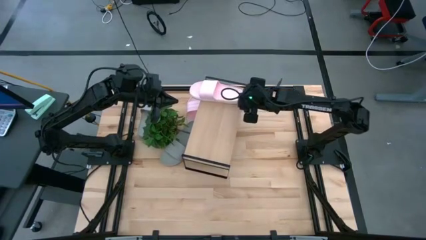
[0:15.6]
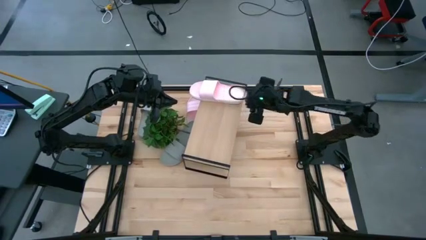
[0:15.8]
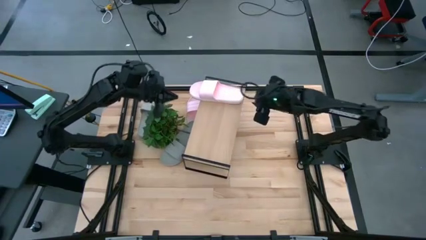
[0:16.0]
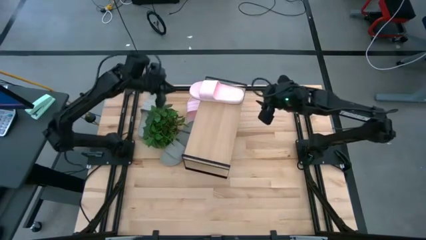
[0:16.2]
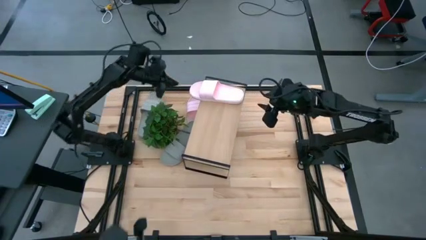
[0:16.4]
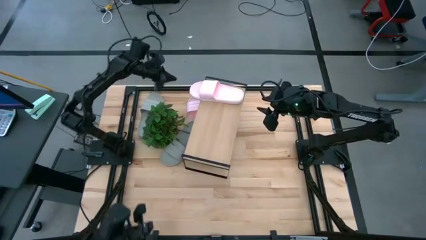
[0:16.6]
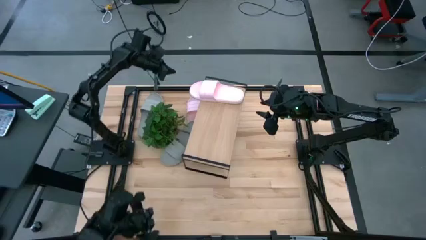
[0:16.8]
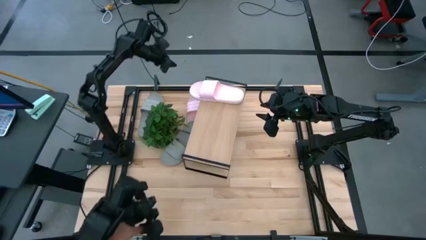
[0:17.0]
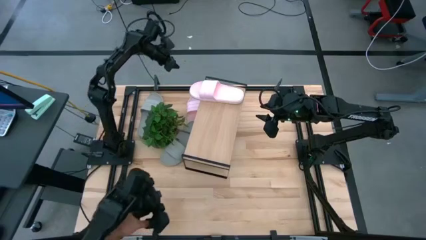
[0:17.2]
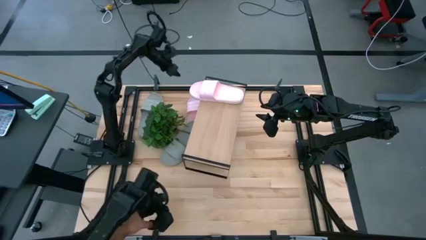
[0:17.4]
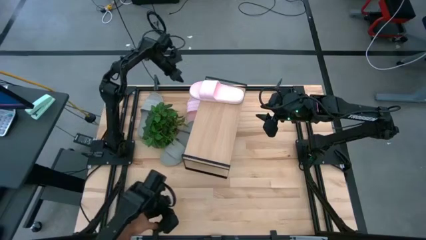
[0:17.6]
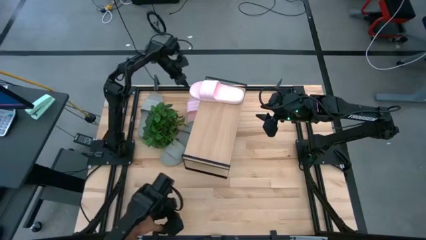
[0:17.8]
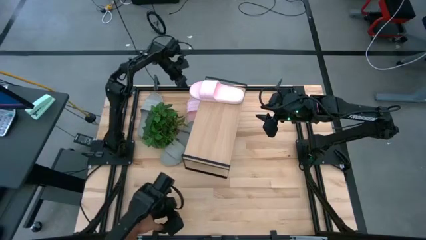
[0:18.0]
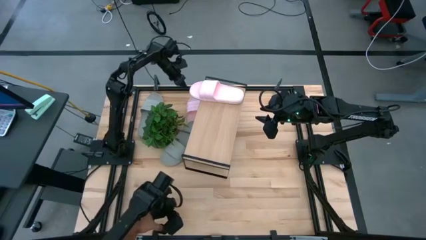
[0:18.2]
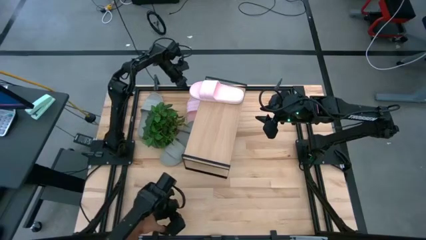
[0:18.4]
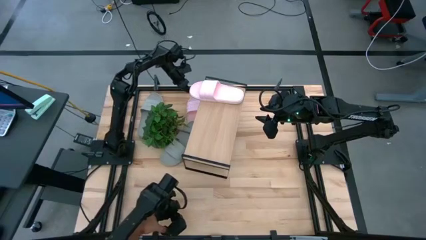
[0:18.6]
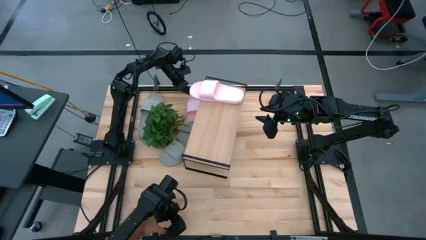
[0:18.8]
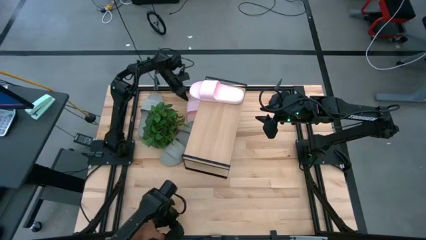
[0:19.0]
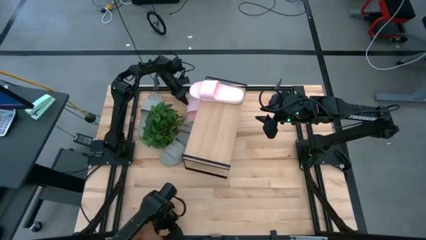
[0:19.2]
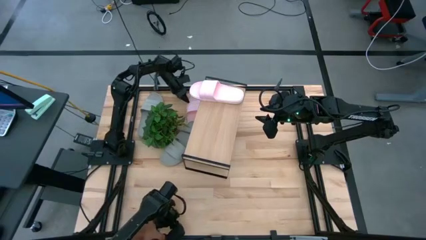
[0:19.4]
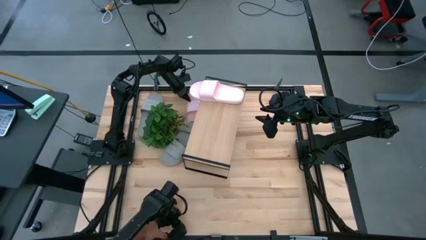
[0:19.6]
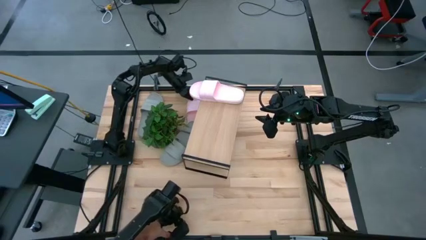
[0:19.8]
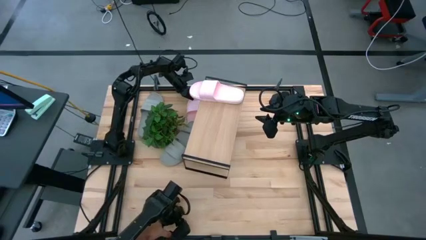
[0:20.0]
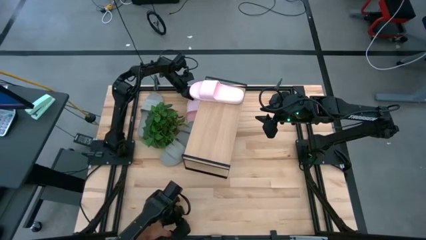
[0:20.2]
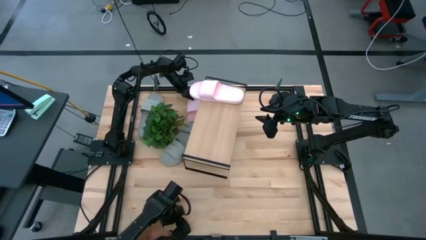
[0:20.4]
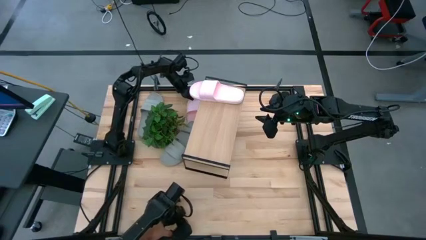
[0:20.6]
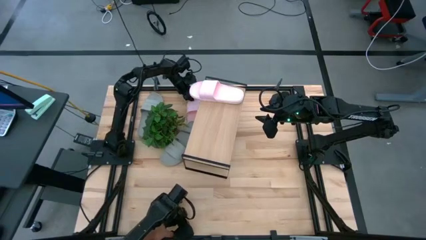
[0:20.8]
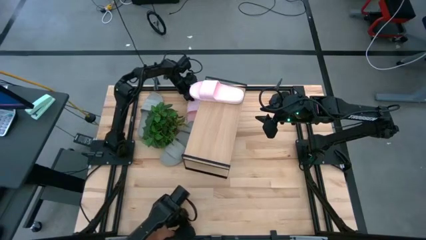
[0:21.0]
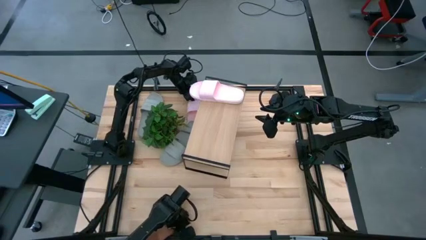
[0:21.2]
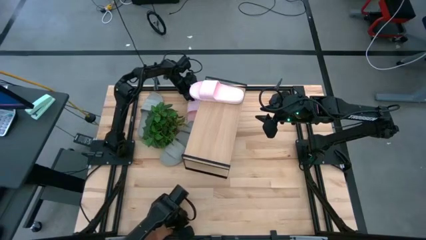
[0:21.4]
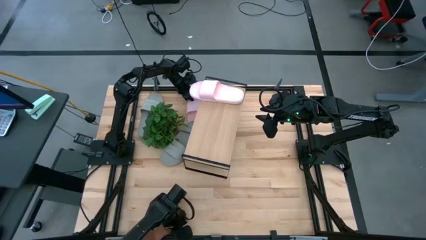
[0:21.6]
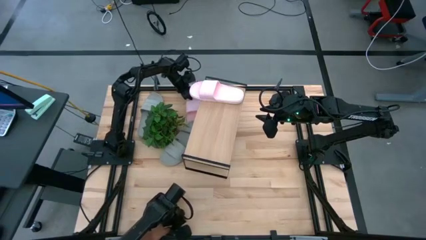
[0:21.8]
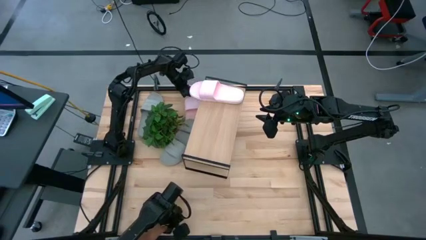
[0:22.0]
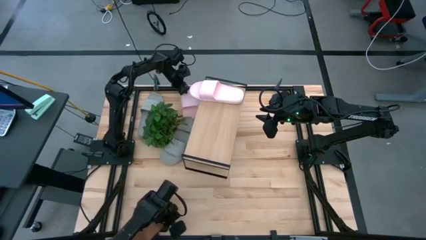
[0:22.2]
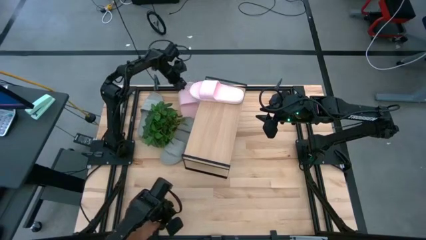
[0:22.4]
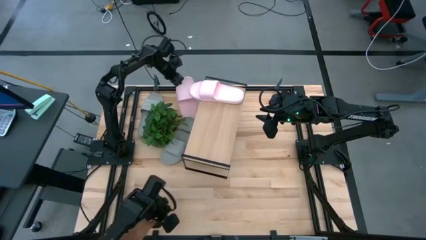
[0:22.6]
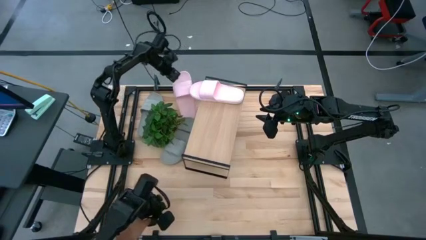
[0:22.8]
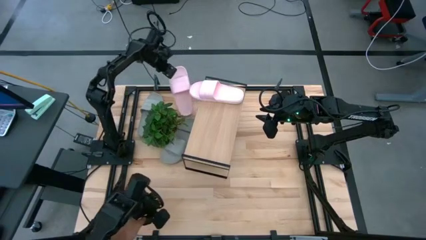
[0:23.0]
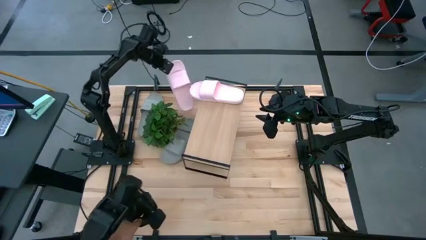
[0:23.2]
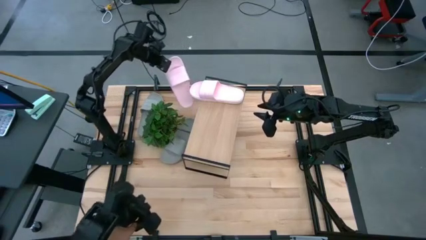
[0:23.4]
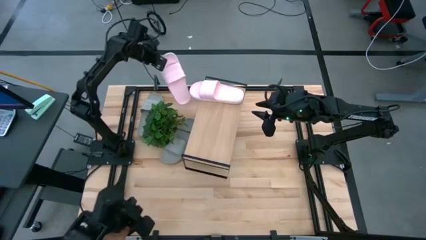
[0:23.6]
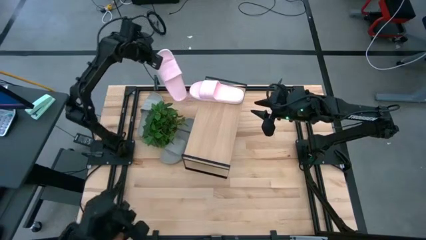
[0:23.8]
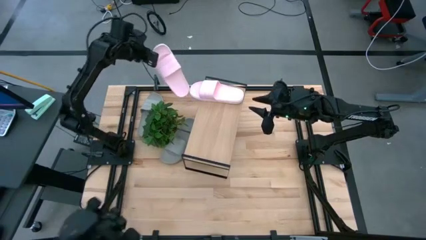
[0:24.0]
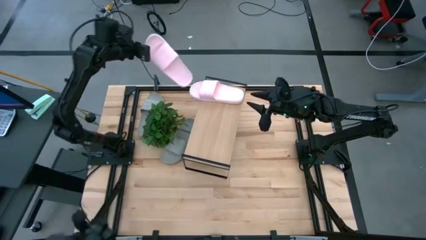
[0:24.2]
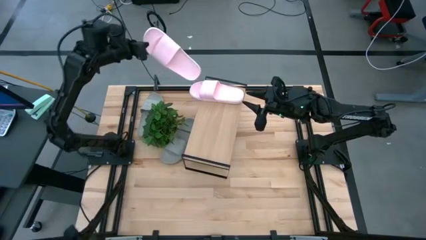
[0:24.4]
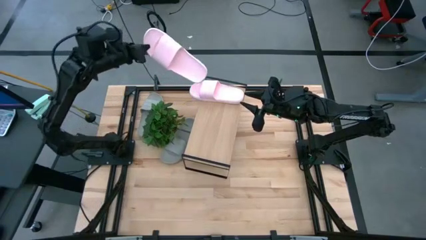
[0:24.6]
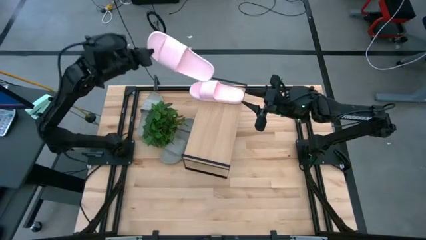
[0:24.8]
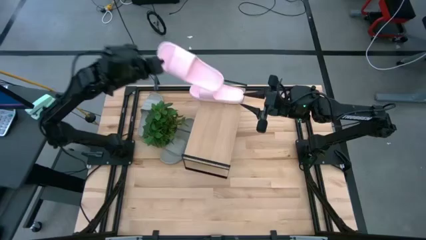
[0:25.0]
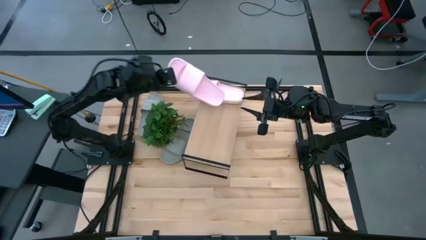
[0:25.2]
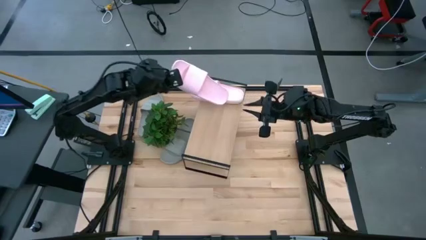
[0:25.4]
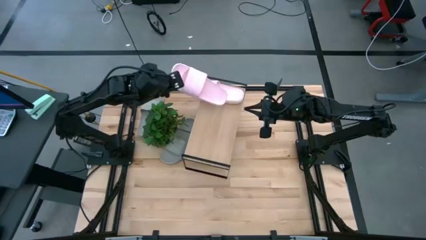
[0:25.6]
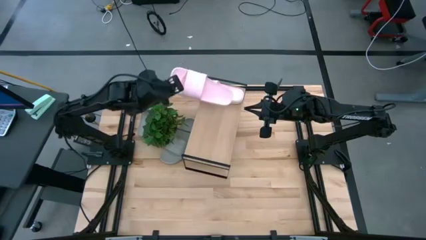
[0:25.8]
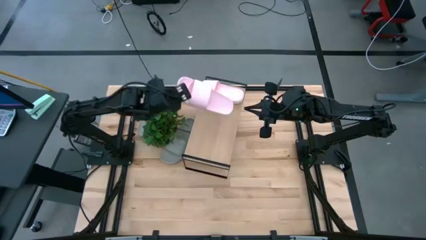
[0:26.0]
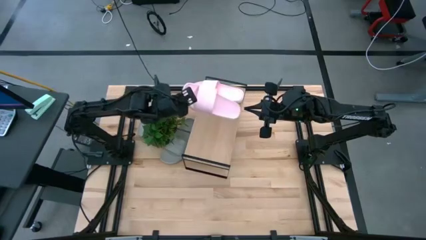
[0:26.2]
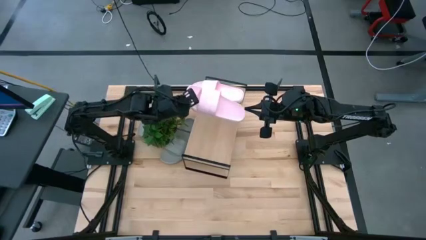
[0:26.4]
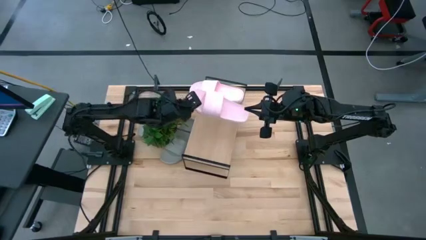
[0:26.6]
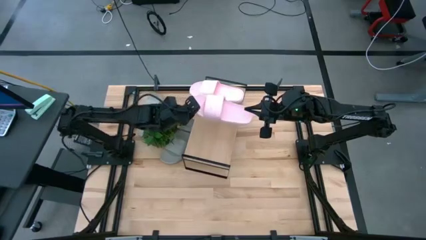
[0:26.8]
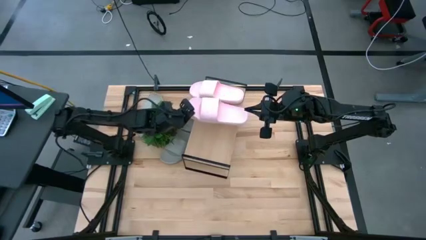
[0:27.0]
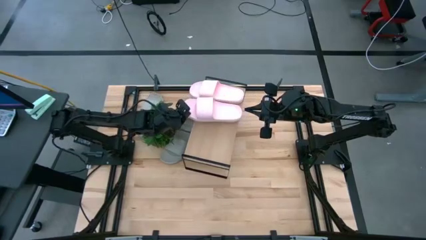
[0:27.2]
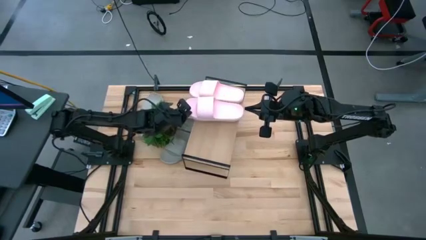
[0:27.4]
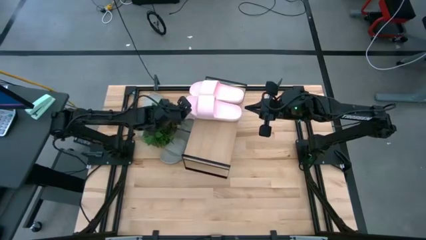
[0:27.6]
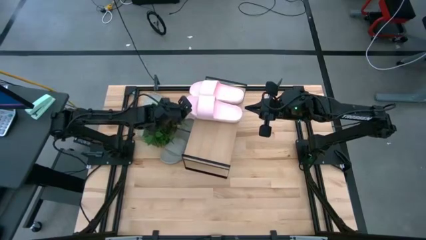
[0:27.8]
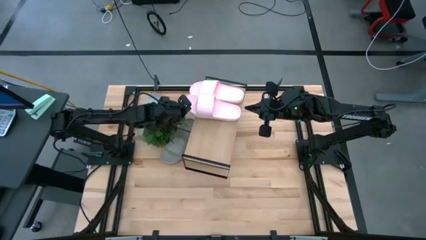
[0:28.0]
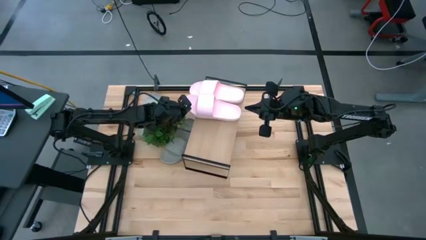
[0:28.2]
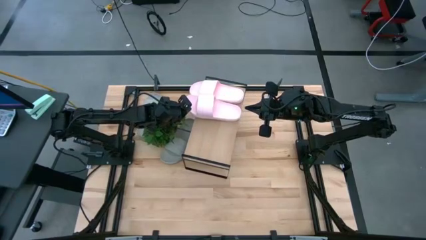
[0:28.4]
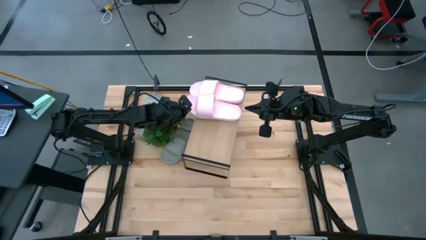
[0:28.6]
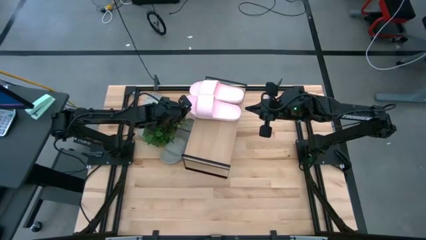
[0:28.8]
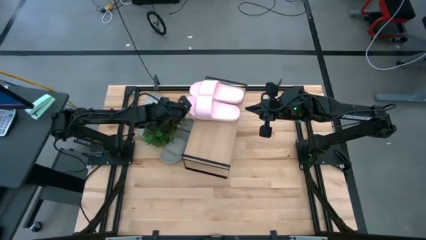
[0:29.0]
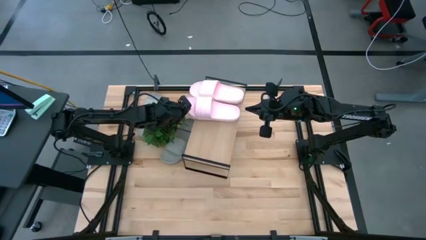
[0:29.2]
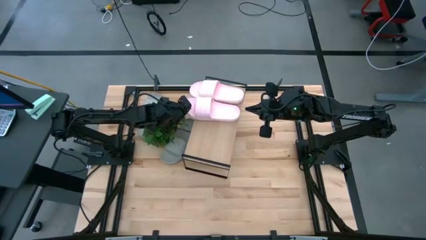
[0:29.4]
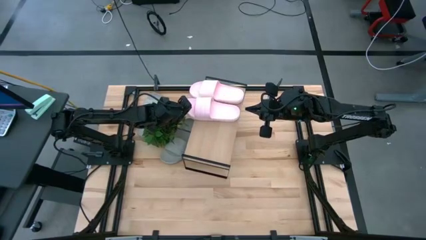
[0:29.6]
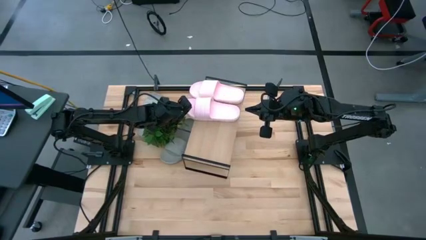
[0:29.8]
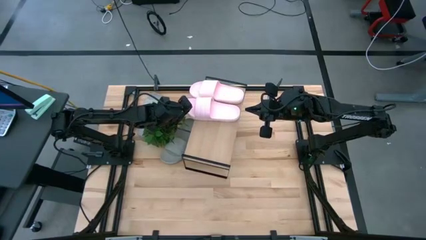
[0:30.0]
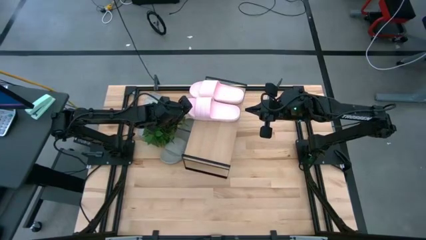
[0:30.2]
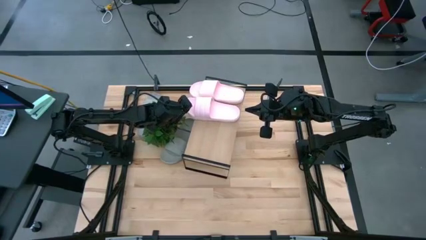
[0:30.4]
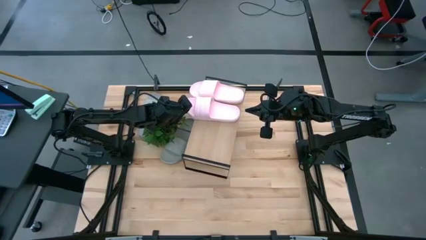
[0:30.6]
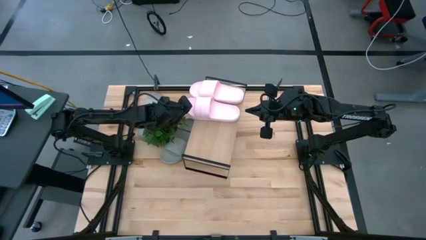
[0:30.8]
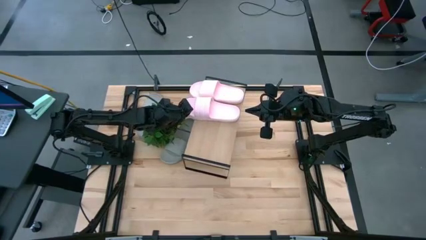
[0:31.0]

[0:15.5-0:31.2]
Task: Pick and place slides into the shelf
Put the pink slide on the shelf
